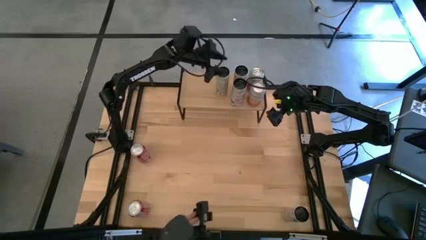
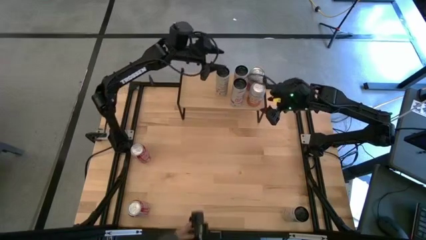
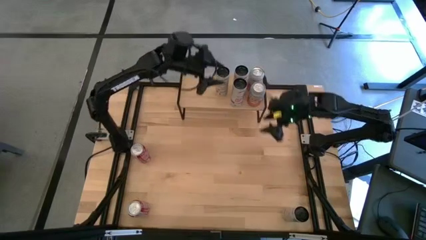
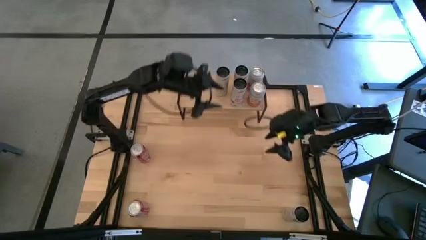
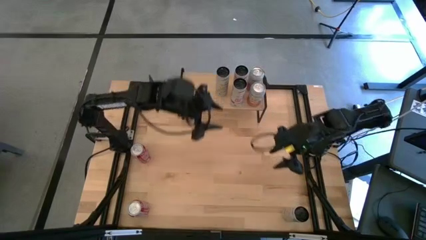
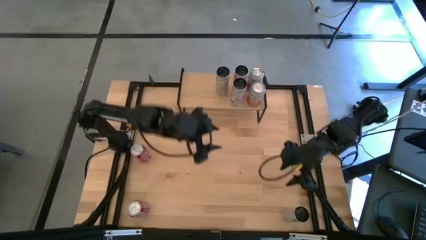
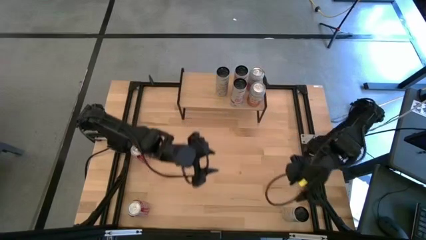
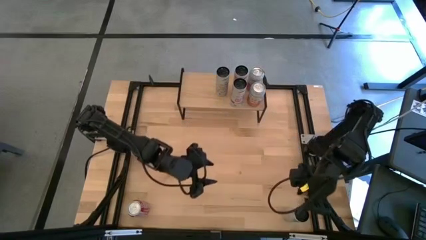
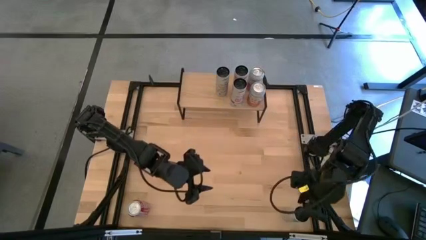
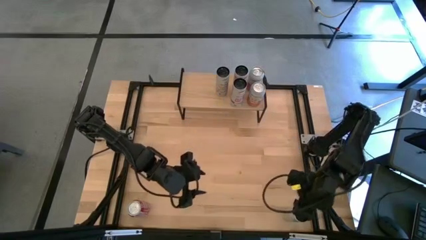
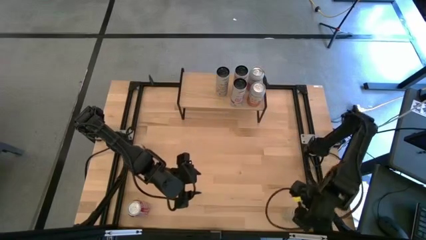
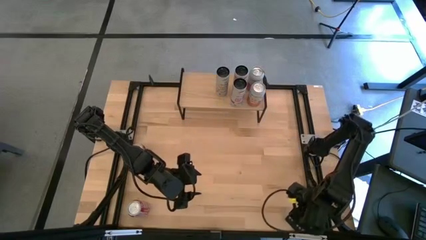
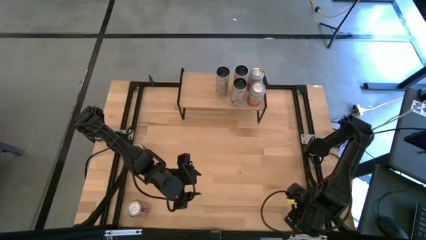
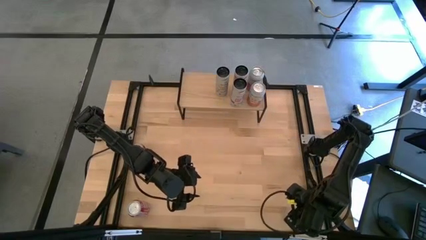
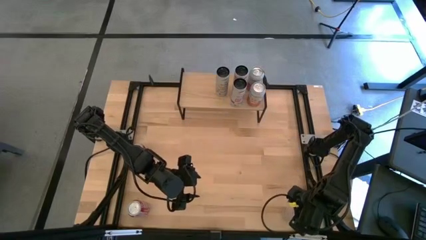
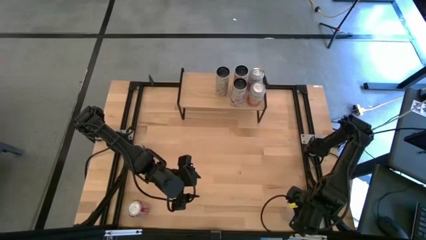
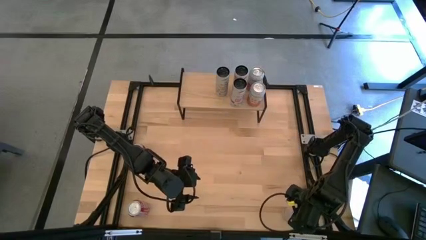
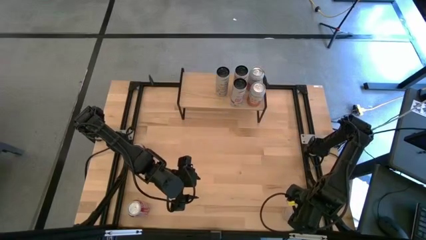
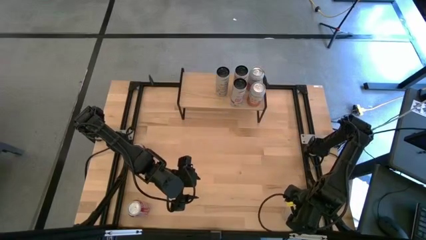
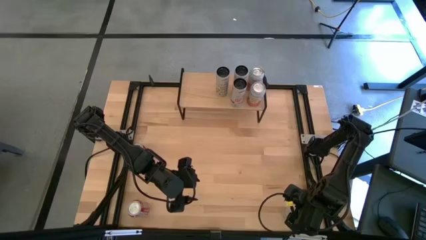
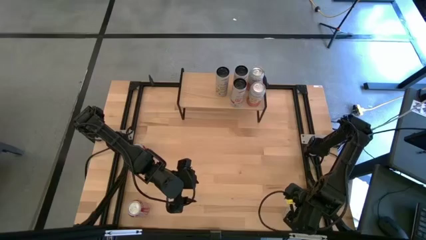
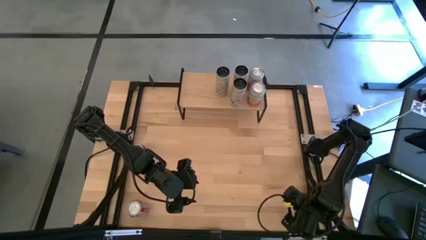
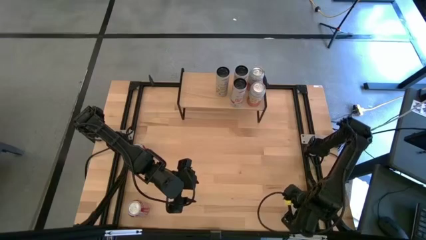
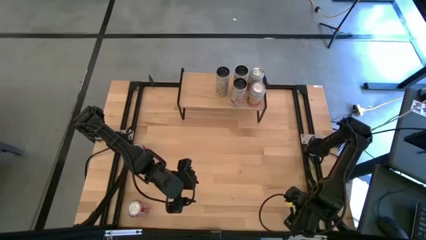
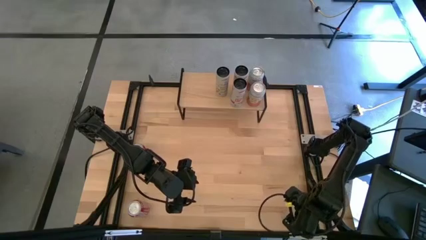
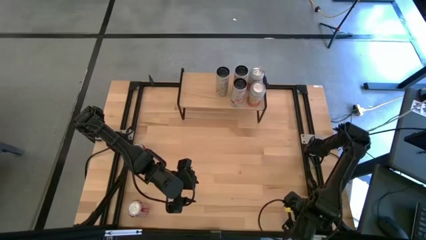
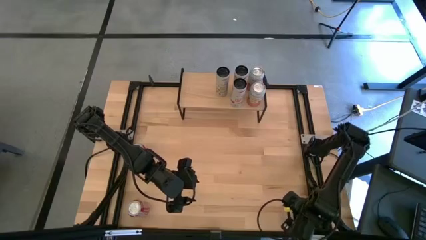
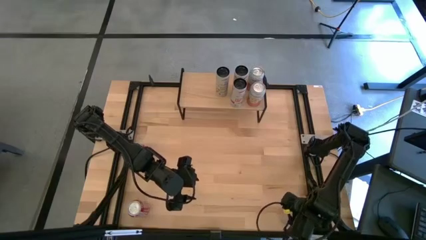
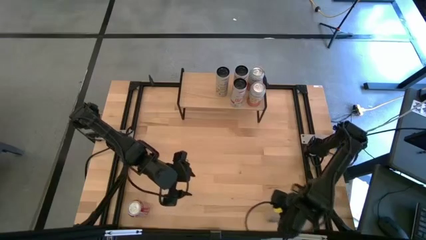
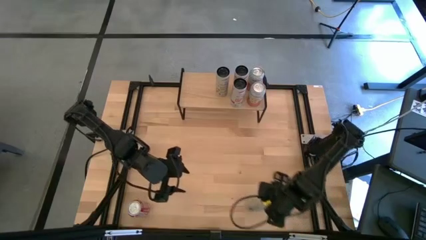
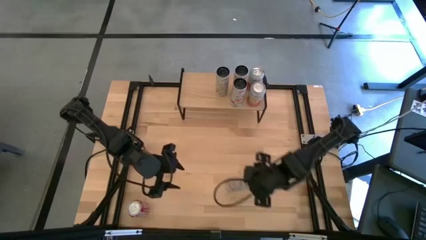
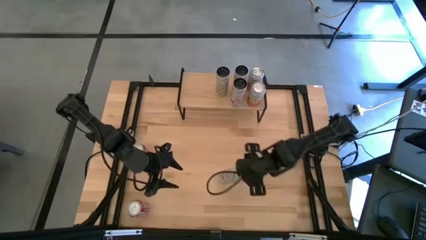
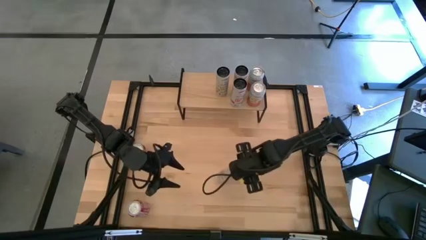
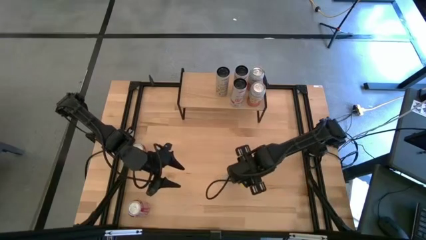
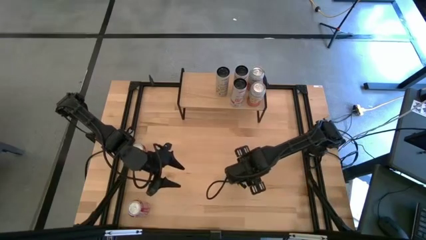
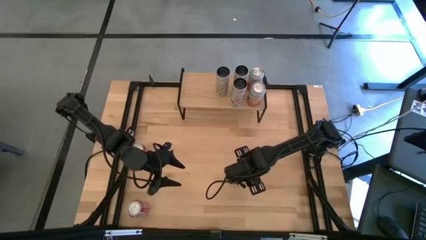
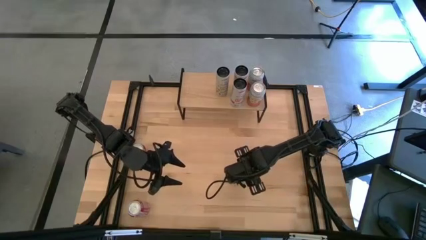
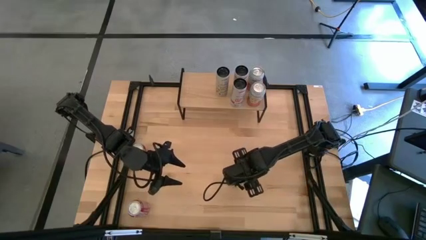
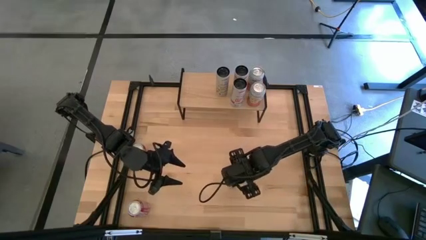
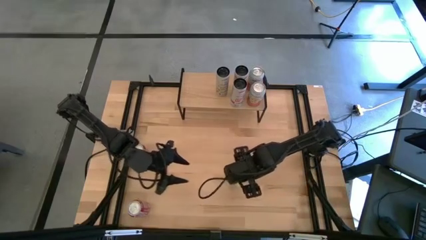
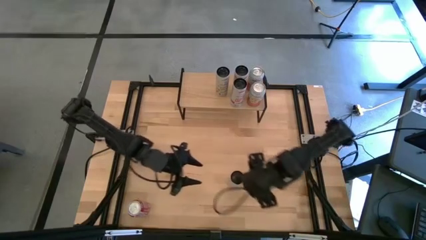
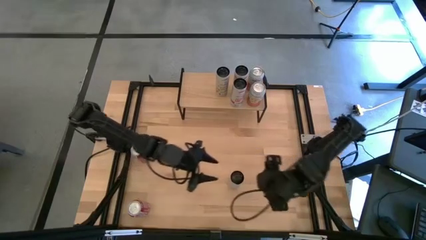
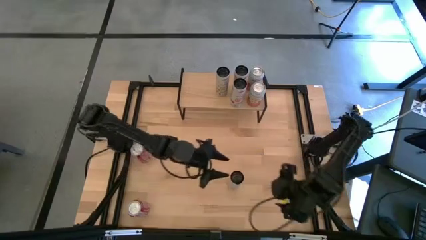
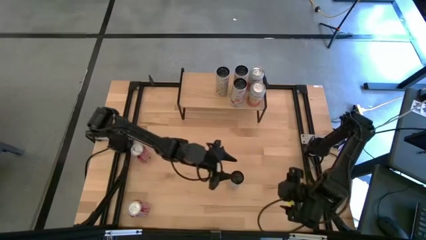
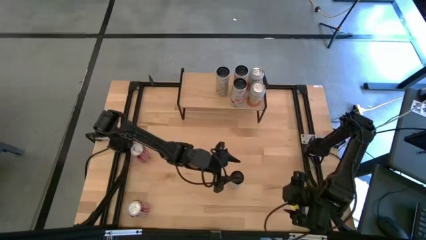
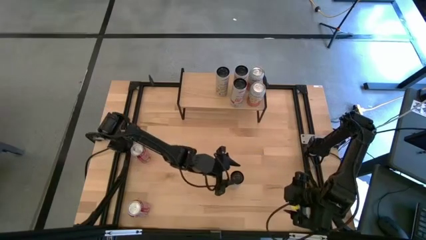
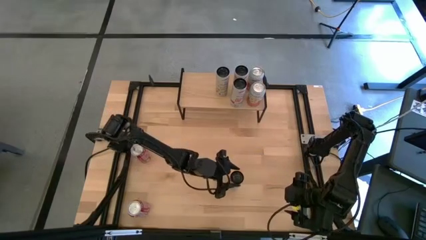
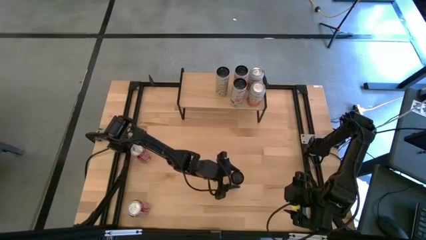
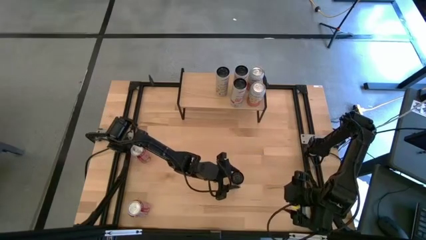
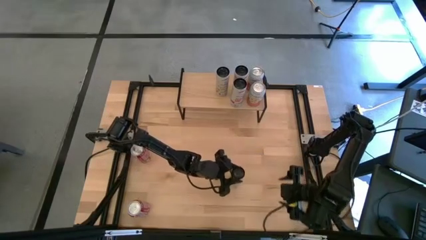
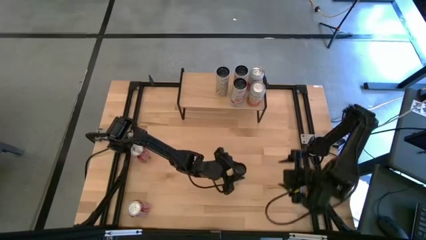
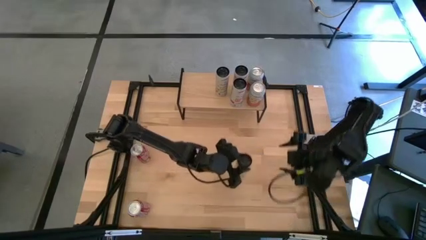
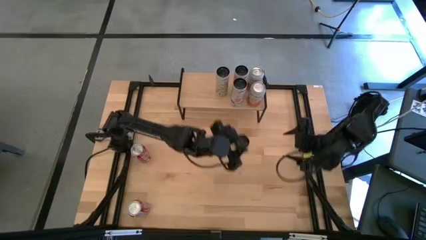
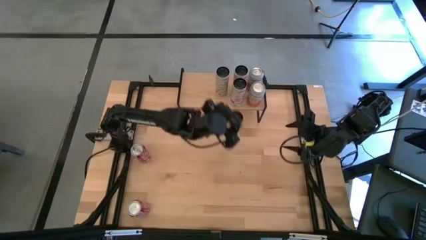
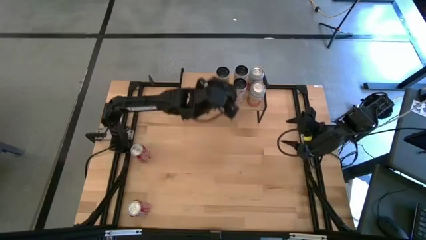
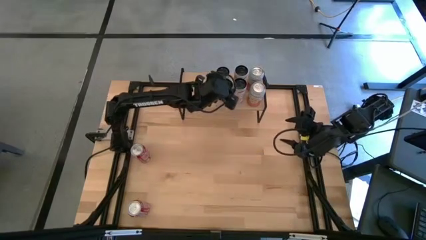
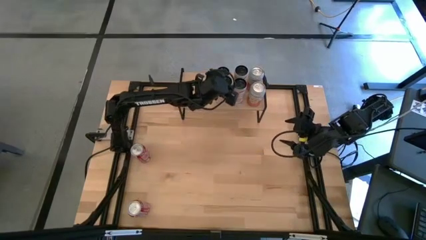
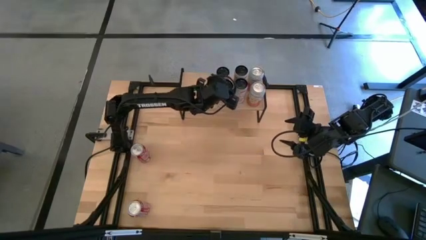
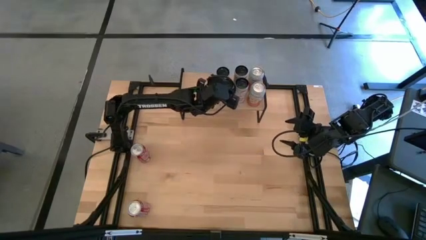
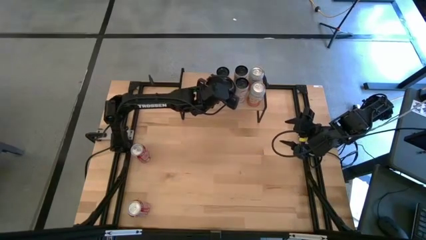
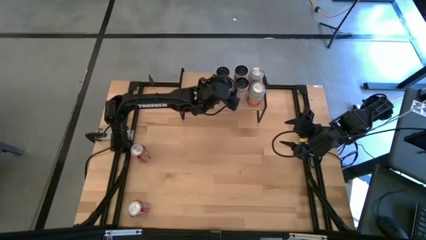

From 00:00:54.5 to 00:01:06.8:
Task: Place canned beverage on shelf
Put the white yellow soda can aligned with the other white yellow soda can on the shelf

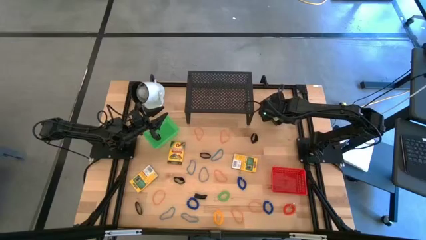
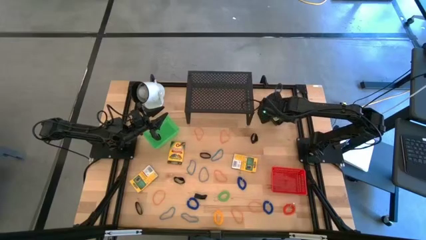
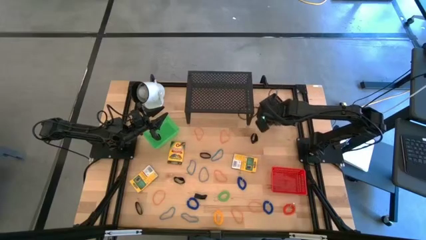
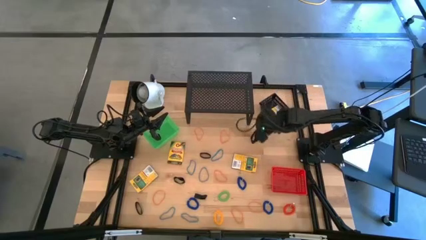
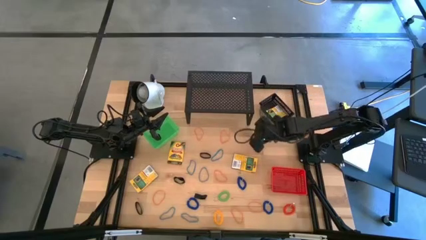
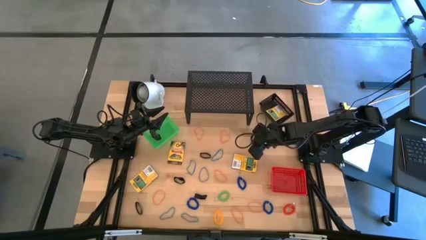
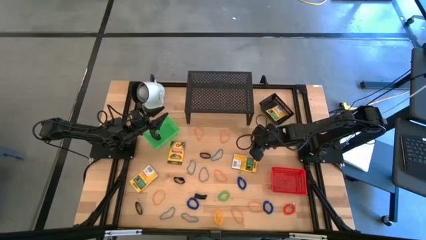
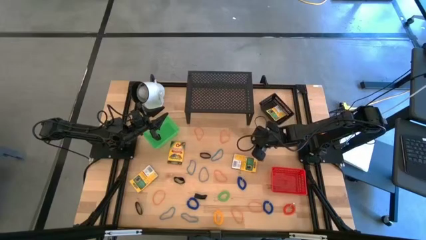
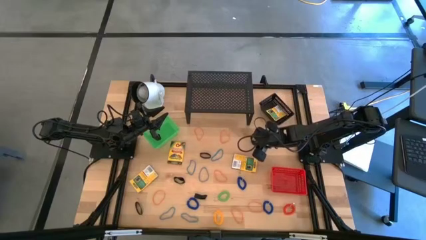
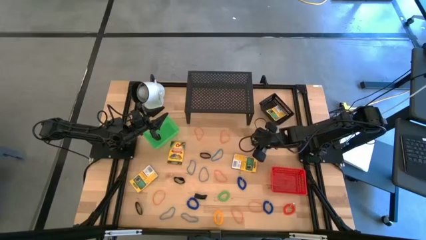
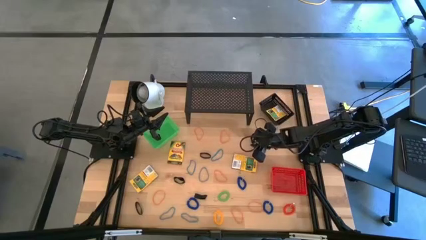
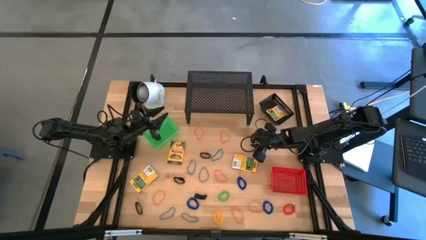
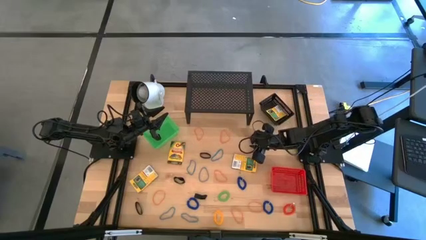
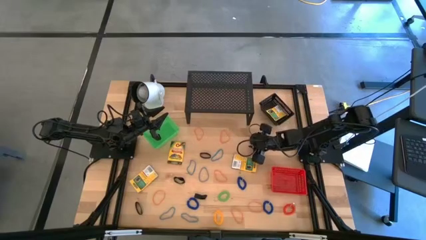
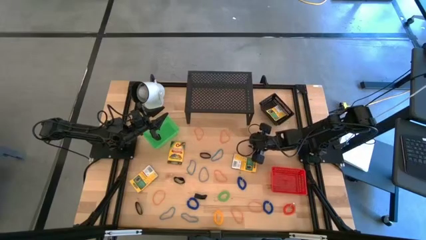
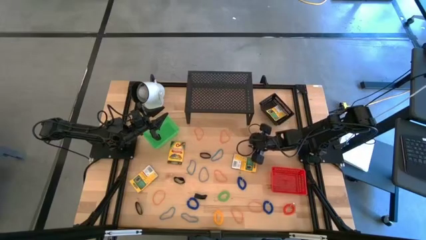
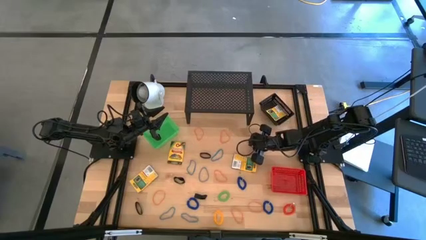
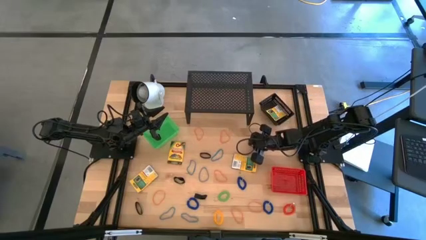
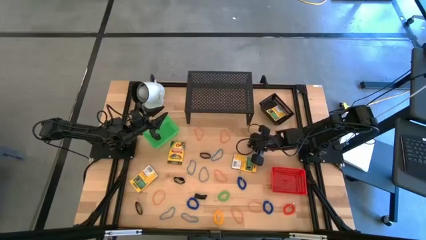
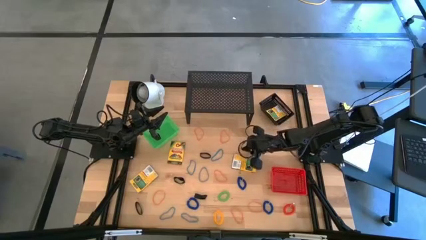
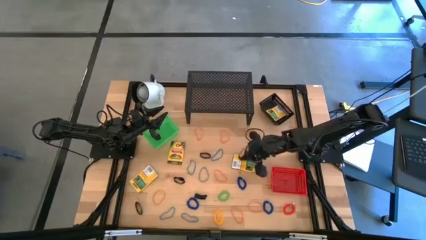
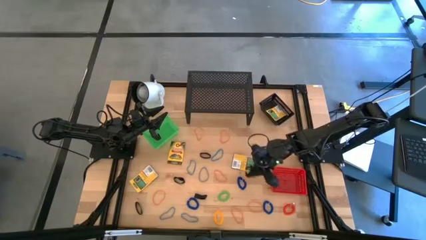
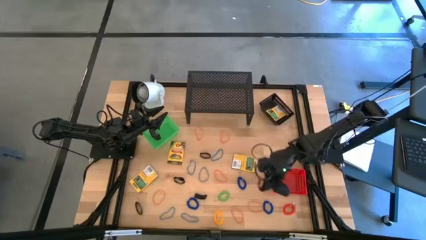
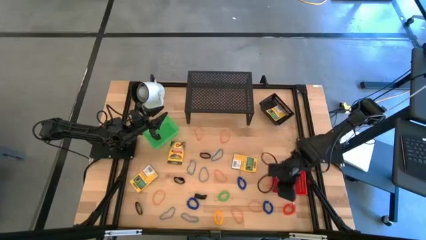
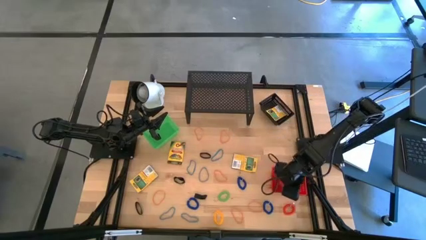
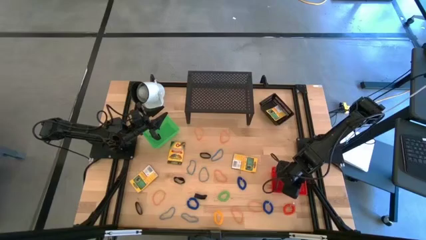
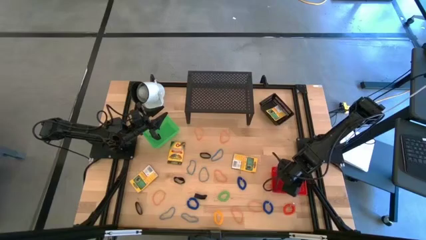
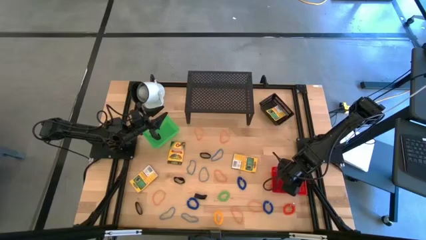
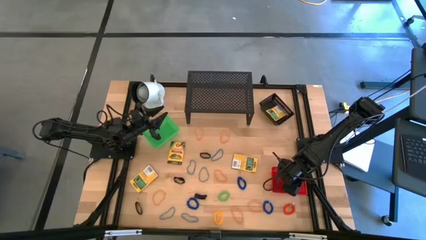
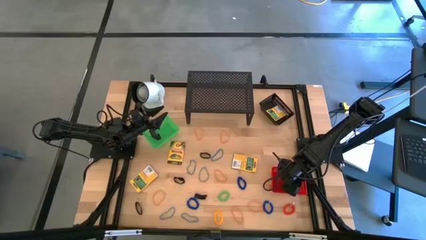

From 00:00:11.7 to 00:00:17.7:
Task: Pick & Place Office Desk Supplies
Put the black rubber band into the red bin
